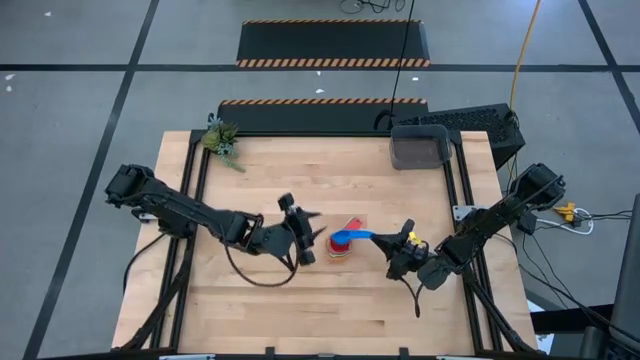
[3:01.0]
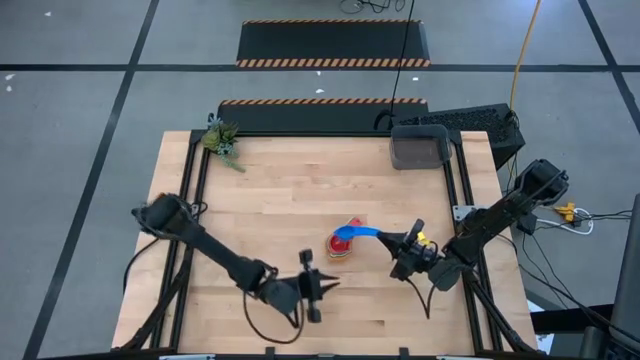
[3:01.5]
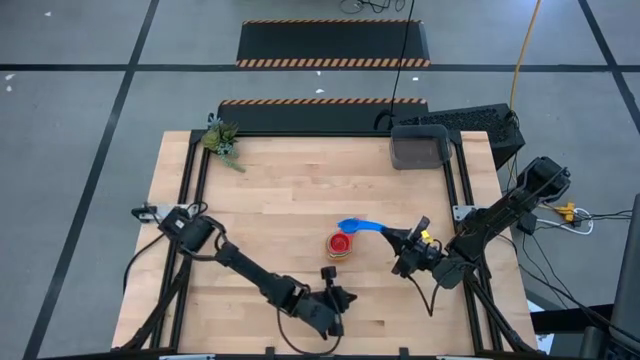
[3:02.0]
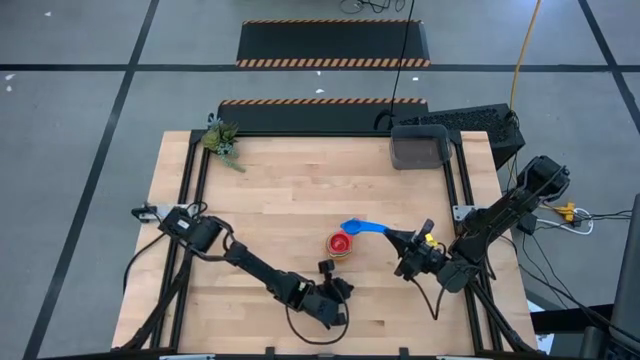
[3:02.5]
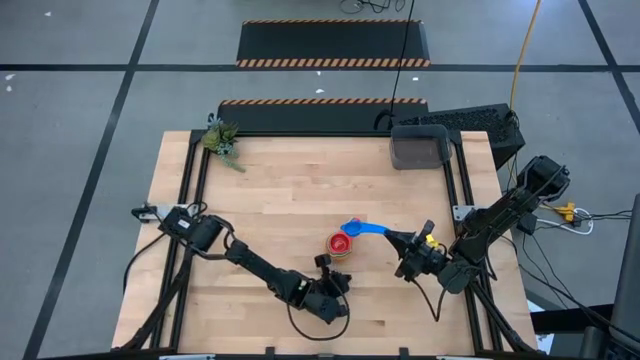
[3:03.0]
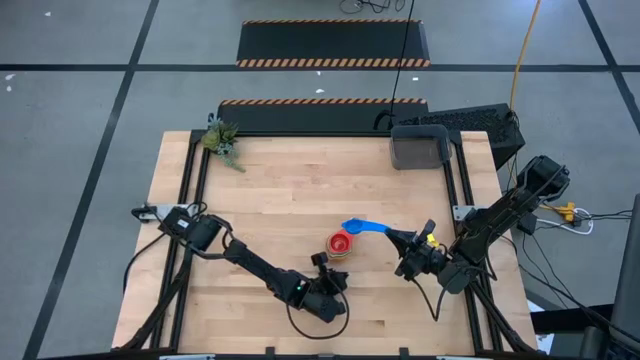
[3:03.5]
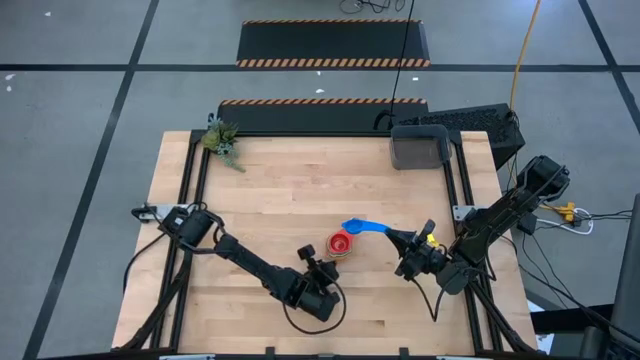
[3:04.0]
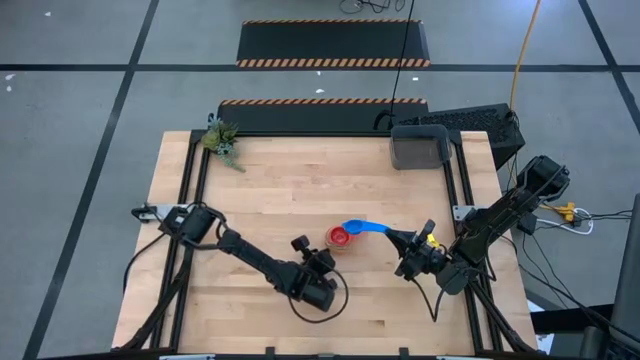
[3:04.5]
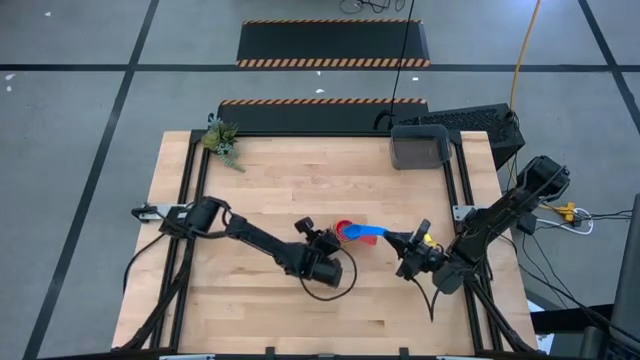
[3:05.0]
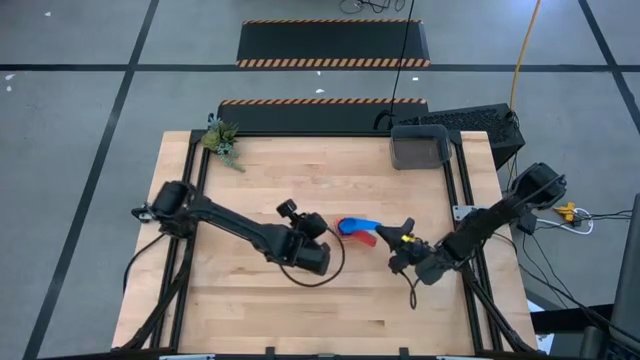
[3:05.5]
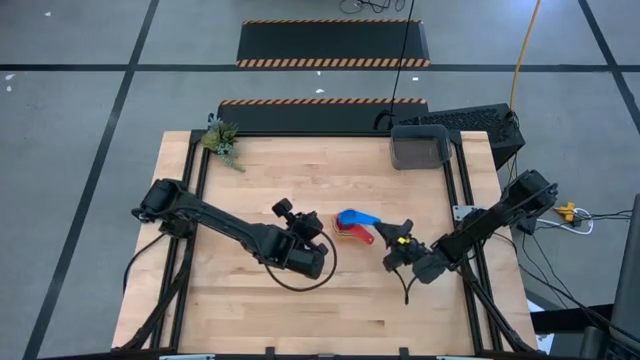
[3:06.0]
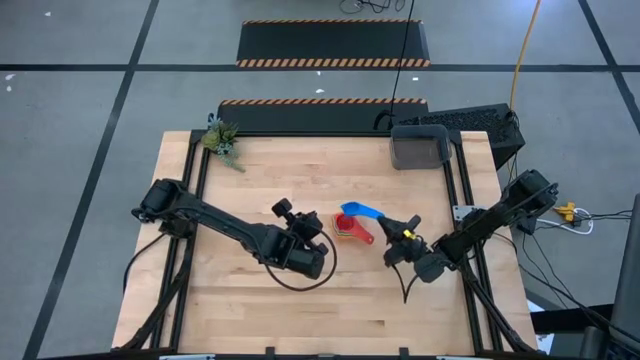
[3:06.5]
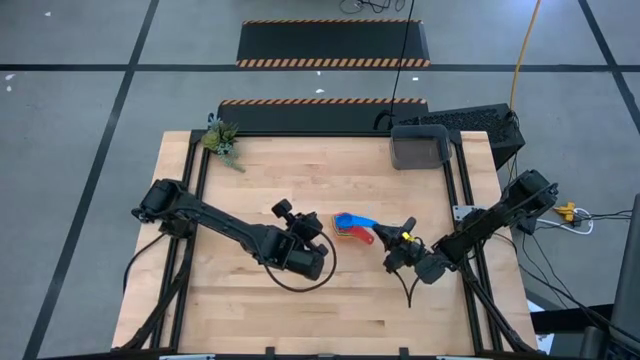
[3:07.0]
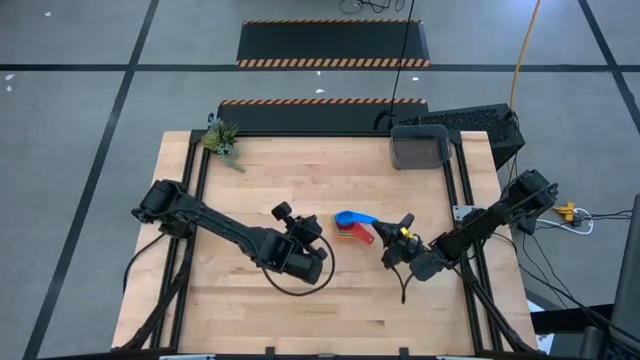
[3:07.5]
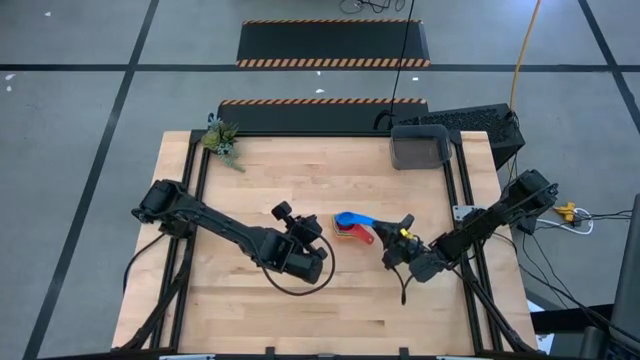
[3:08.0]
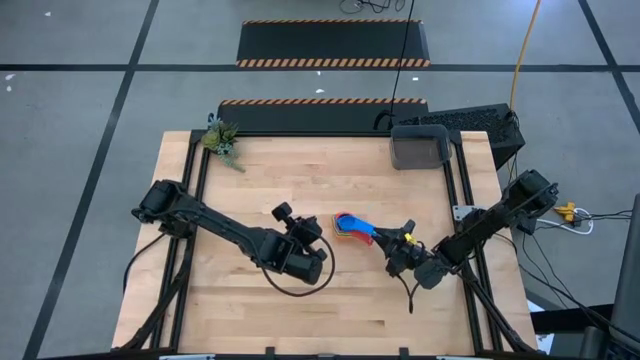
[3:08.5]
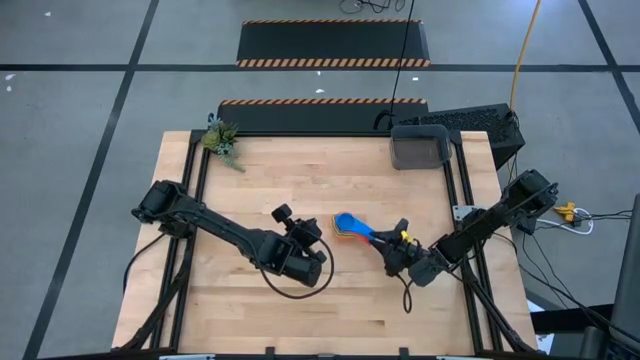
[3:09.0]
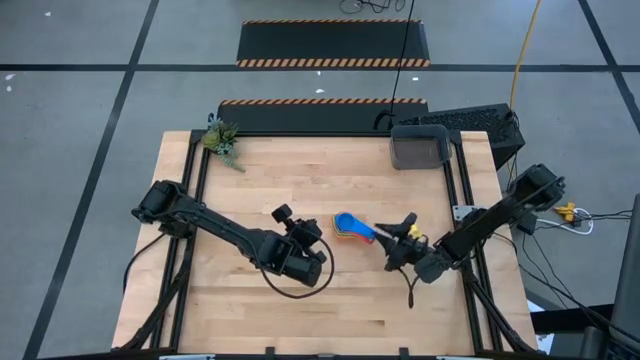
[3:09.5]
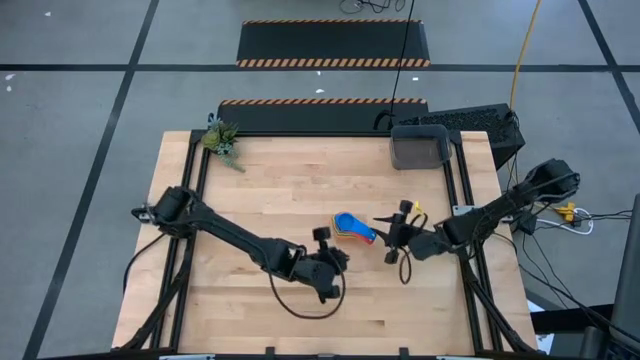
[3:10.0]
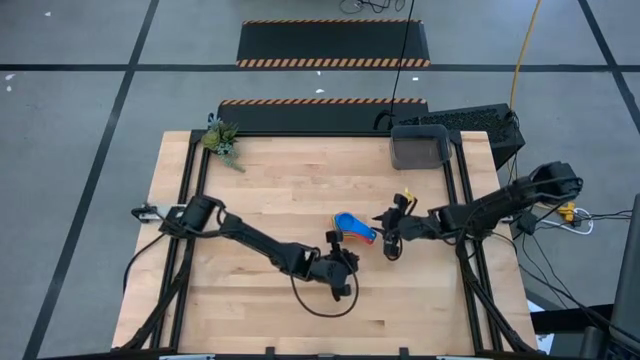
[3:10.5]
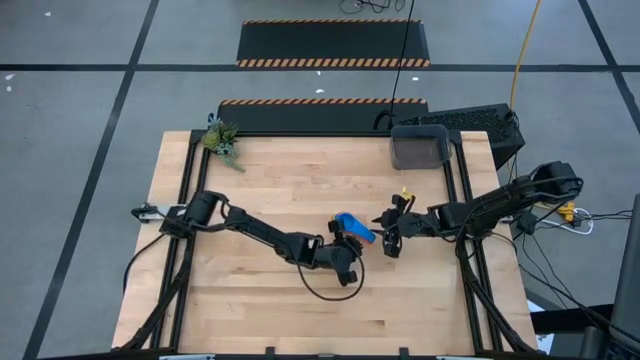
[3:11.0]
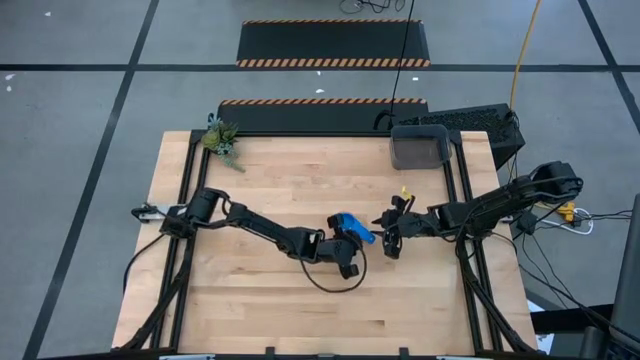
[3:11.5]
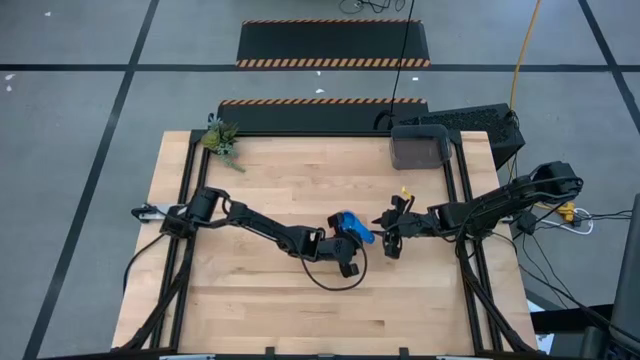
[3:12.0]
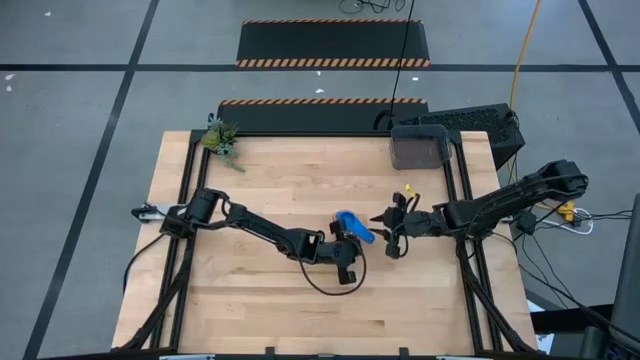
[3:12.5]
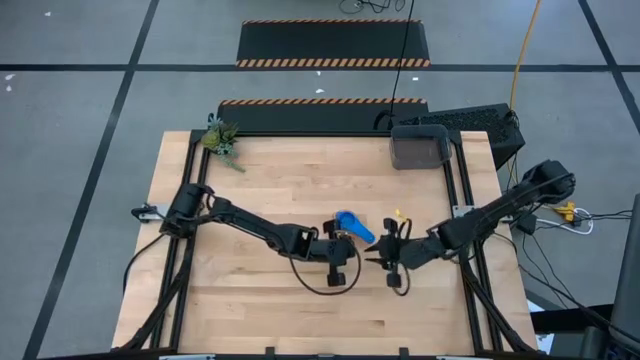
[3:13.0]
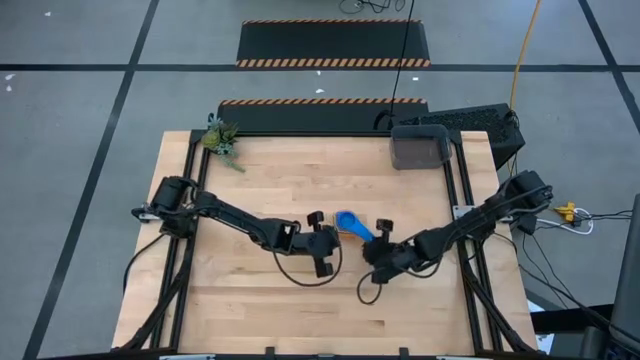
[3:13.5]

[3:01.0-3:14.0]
Task: Nest measuring cups in basket
Stack the blue measuring cup on top of the light red measuring cup

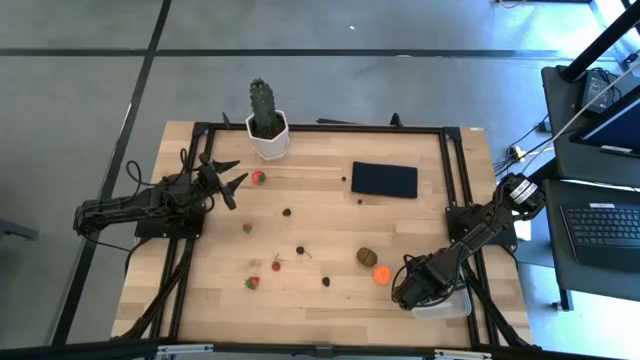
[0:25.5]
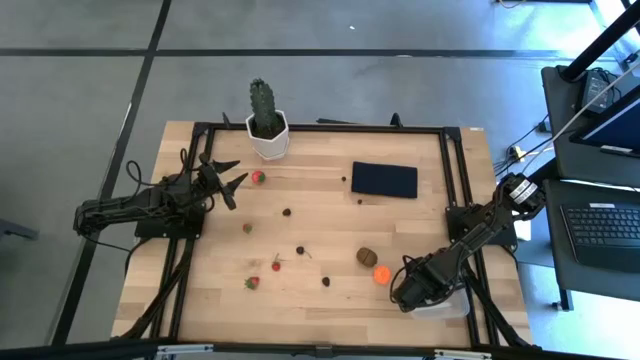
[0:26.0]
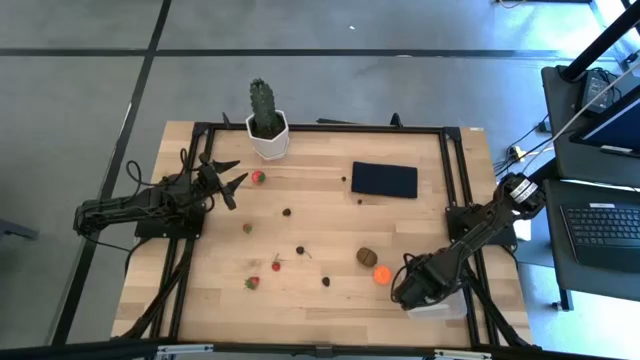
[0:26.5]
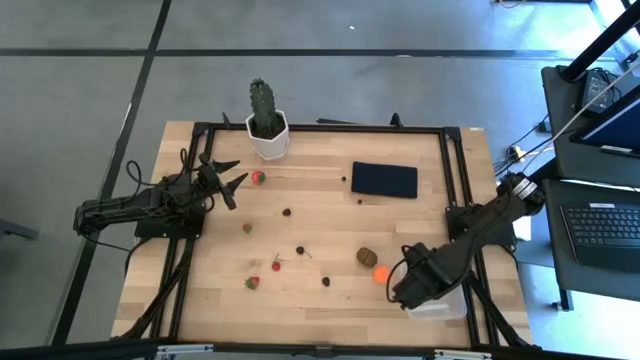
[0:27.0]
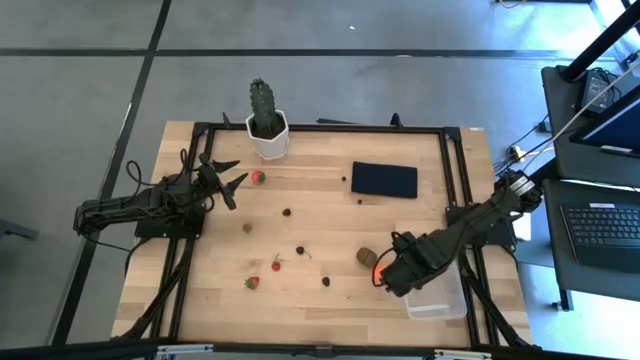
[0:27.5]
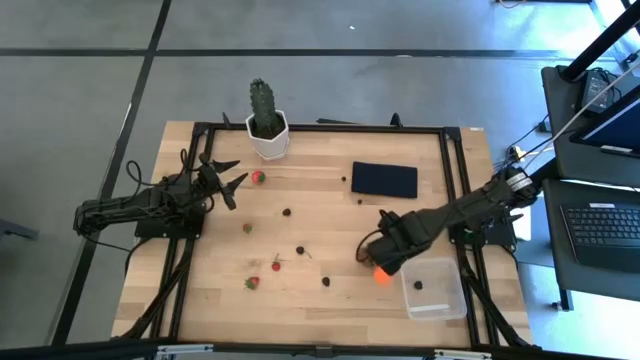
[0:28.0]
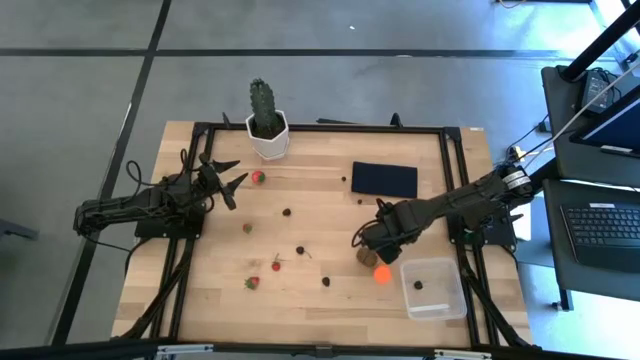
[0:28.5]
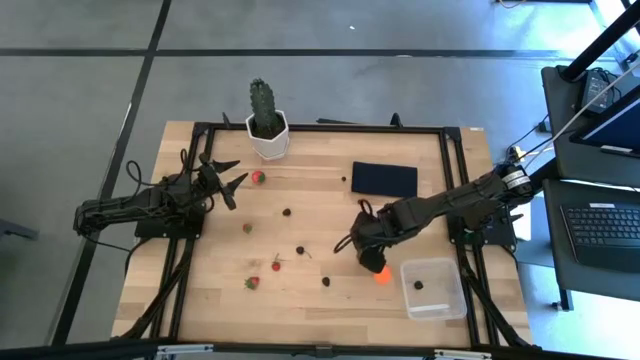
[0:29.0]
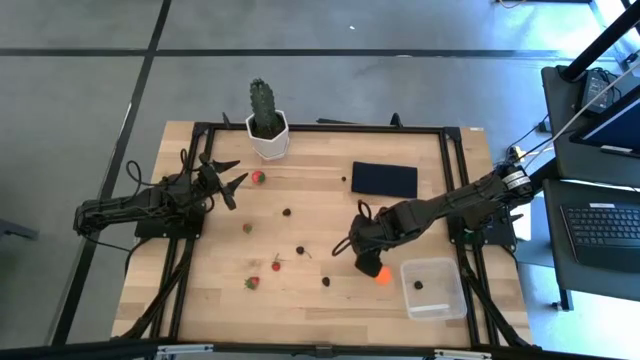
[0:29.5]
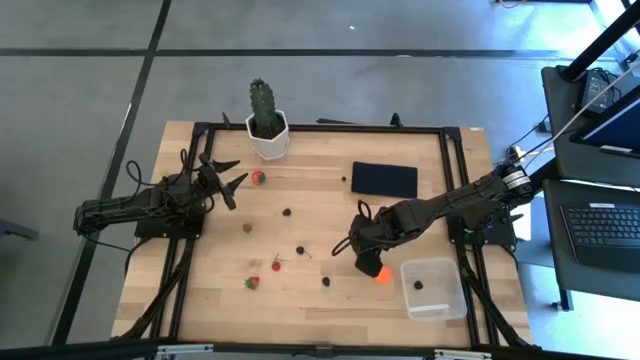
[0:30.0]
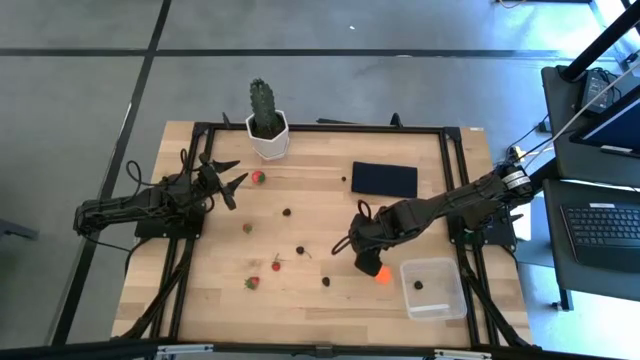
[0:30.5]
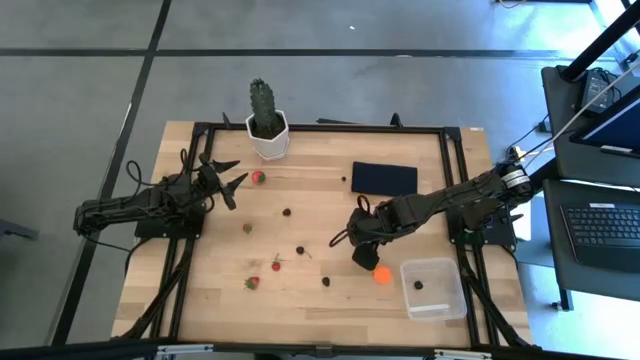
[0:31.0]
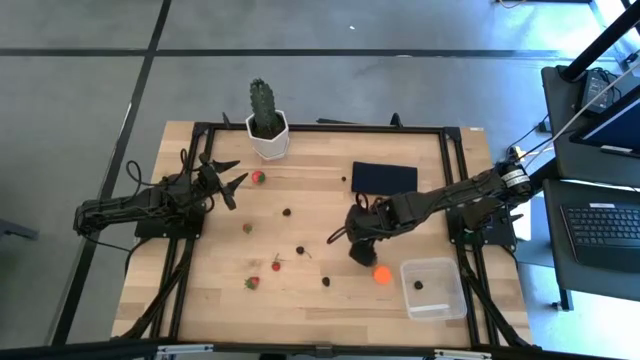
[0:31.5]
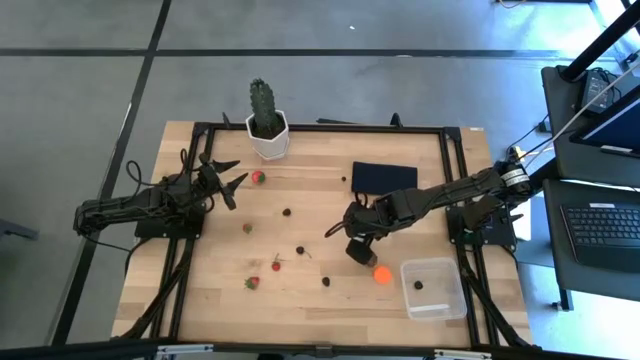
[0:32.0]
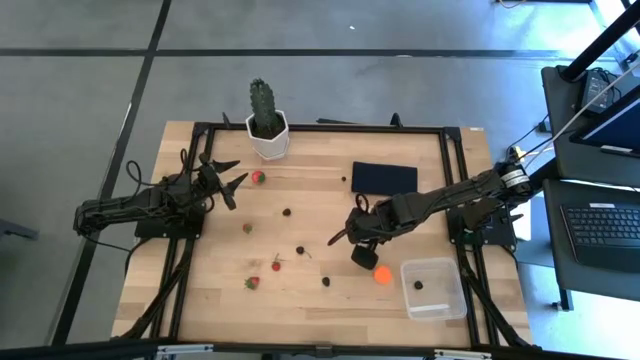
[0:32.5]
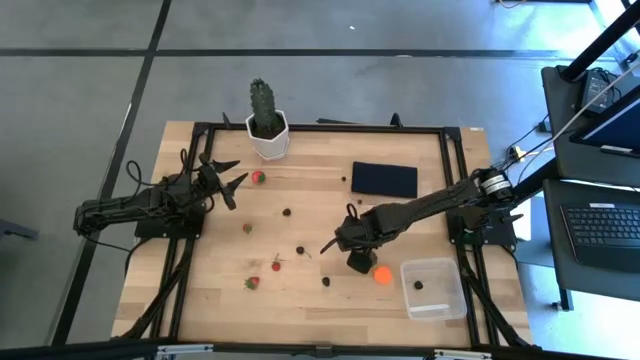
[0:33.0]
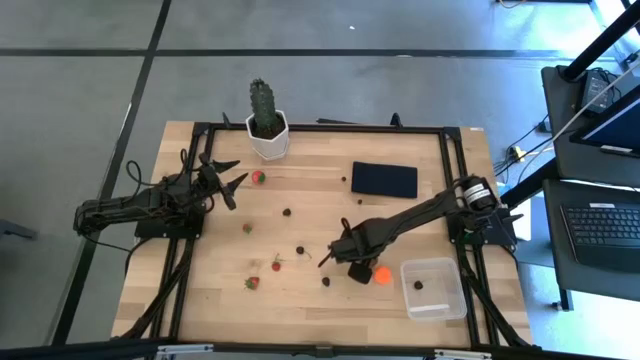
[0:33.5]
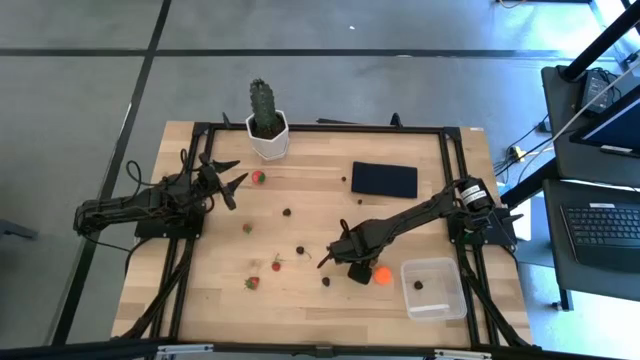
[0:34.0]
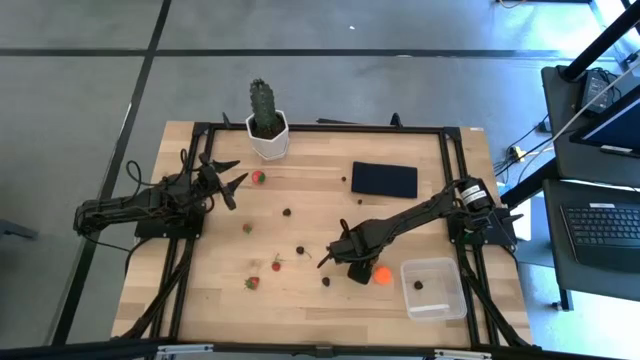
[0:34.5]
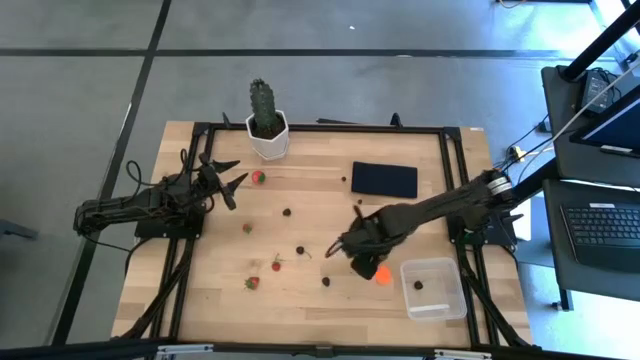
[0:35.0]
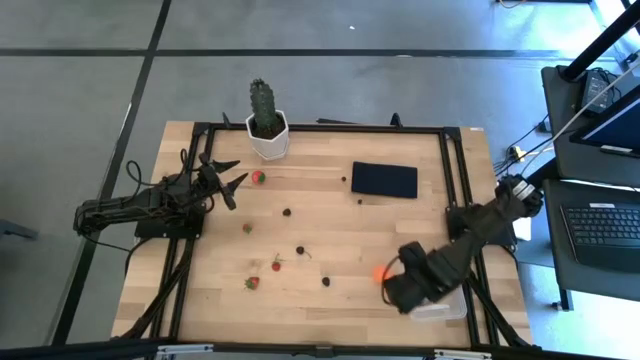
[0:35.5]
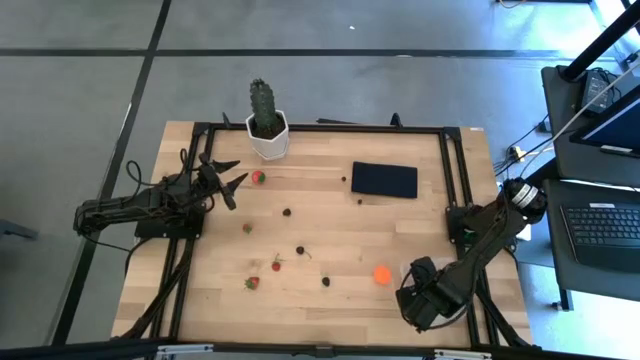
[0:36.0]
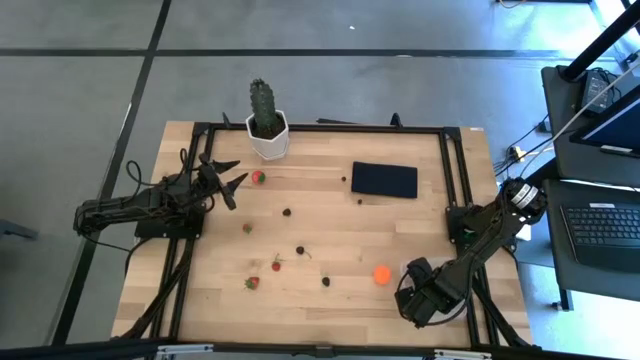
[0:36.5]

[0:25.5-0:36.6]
Task: Pick and placing Produce into tupperware
Put the kiwi into the transparent bin
